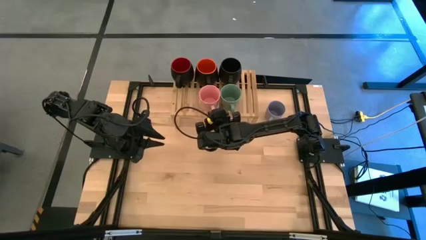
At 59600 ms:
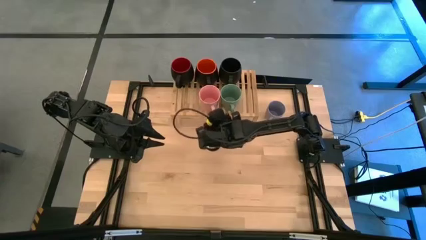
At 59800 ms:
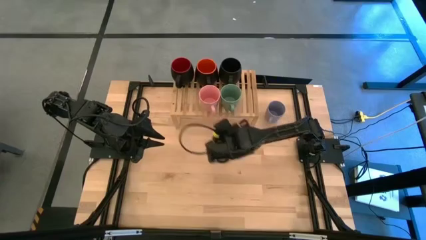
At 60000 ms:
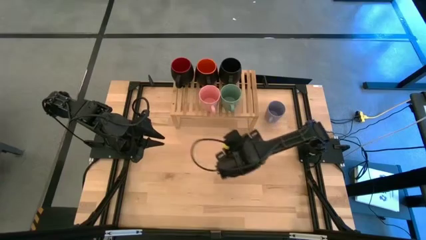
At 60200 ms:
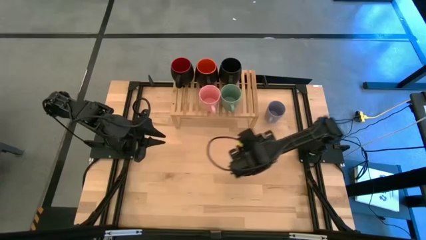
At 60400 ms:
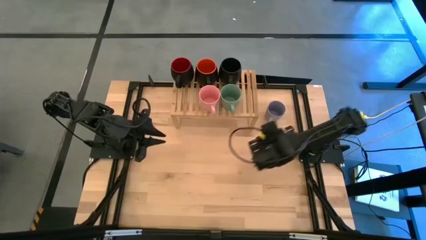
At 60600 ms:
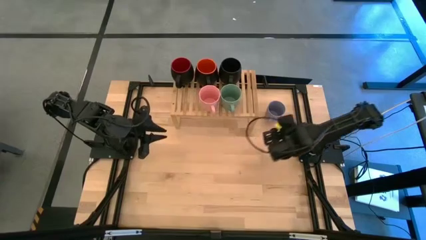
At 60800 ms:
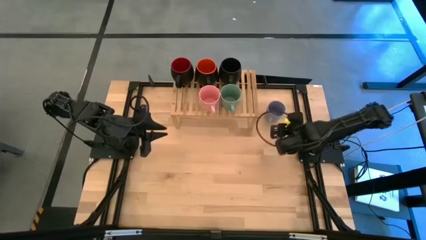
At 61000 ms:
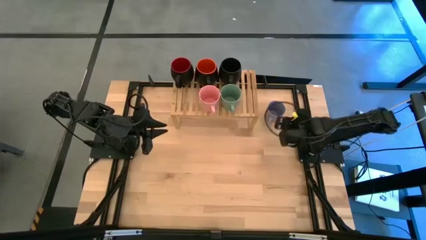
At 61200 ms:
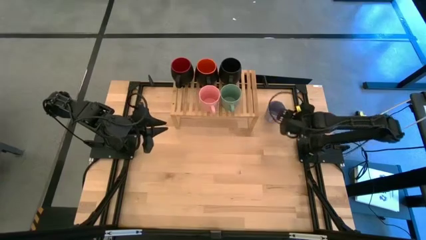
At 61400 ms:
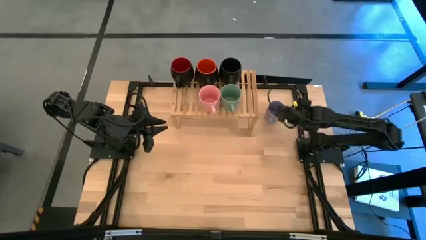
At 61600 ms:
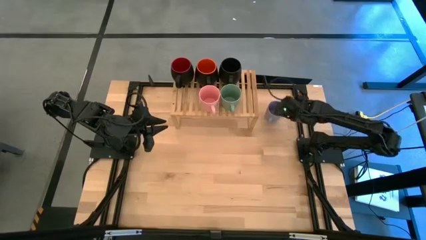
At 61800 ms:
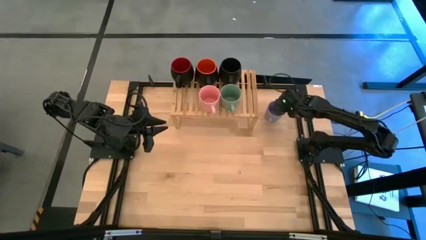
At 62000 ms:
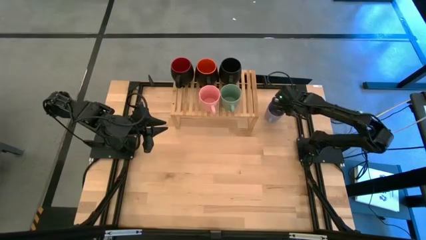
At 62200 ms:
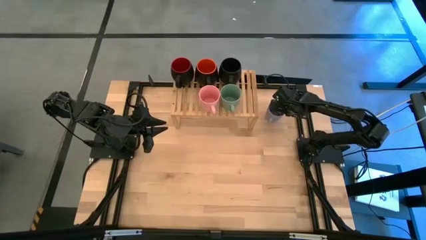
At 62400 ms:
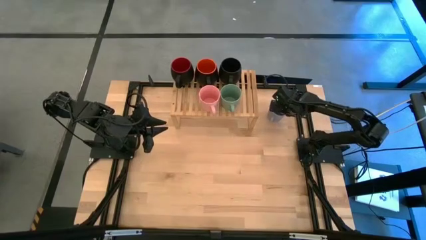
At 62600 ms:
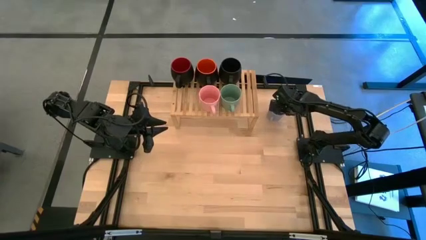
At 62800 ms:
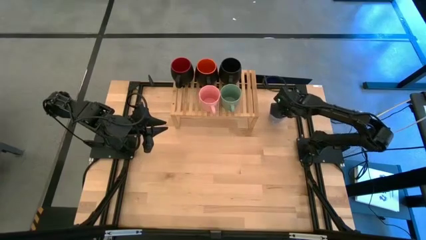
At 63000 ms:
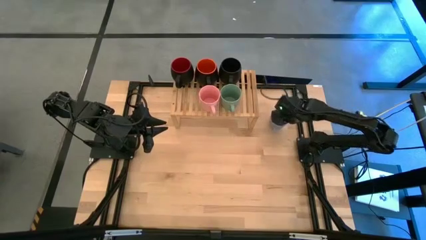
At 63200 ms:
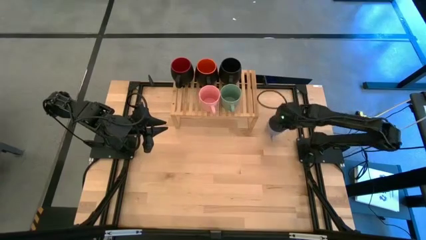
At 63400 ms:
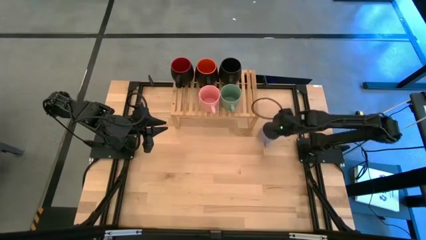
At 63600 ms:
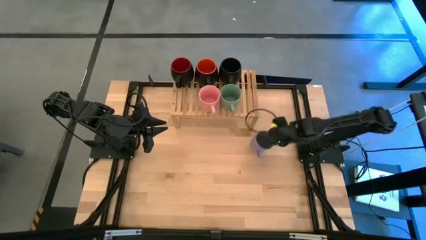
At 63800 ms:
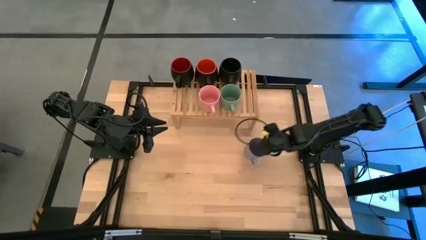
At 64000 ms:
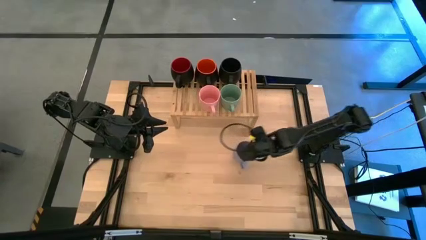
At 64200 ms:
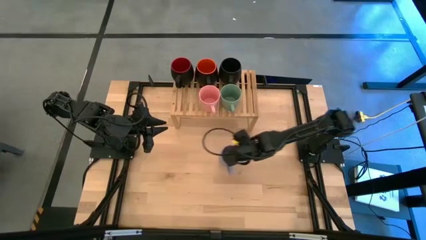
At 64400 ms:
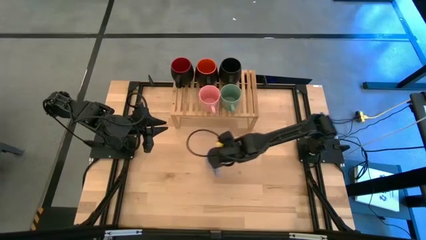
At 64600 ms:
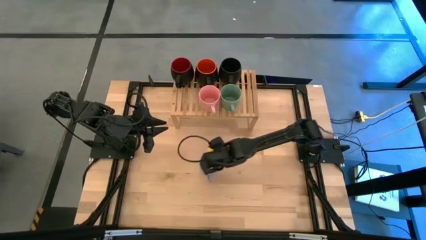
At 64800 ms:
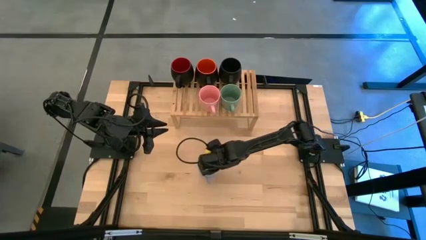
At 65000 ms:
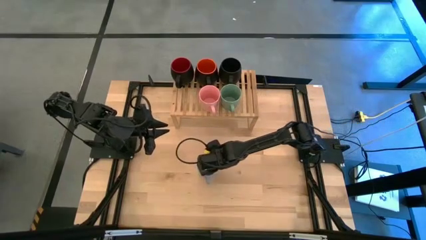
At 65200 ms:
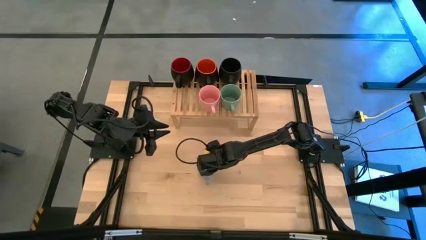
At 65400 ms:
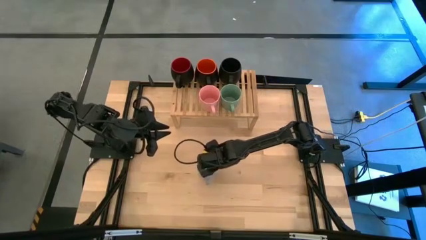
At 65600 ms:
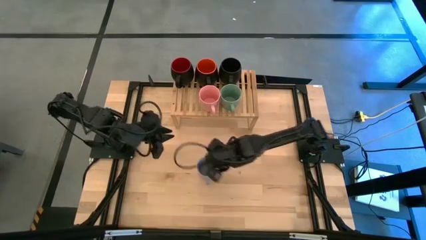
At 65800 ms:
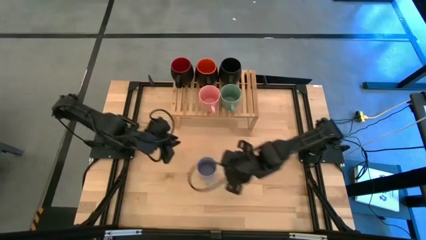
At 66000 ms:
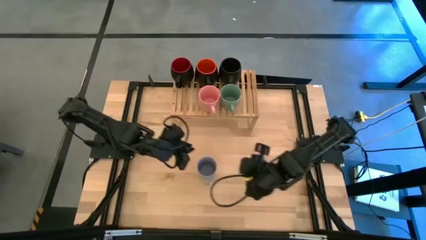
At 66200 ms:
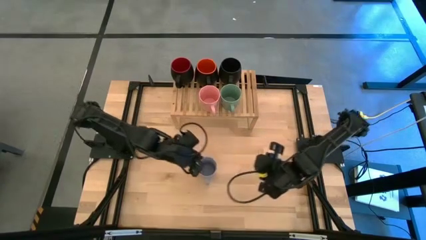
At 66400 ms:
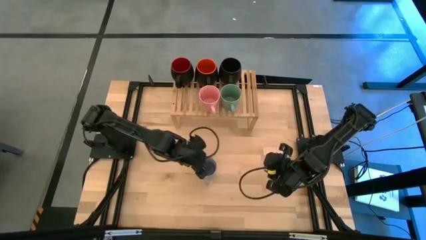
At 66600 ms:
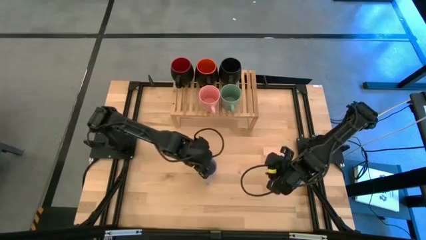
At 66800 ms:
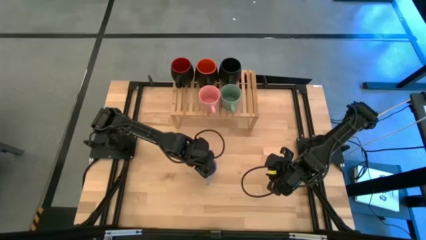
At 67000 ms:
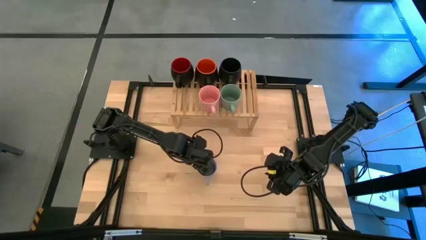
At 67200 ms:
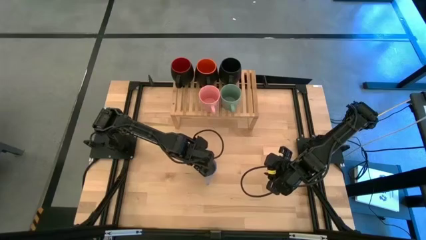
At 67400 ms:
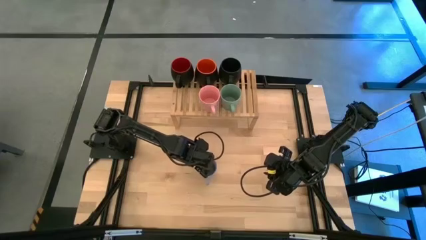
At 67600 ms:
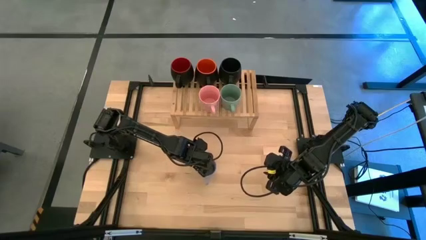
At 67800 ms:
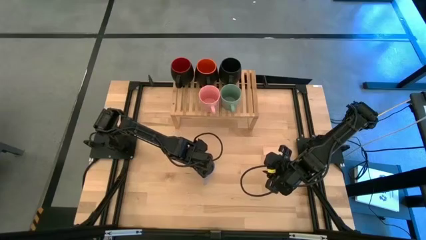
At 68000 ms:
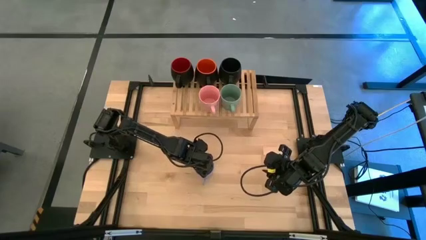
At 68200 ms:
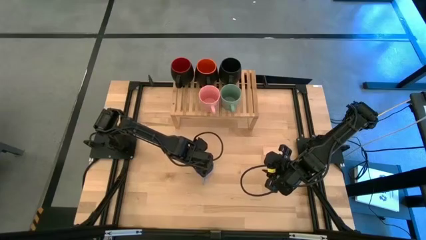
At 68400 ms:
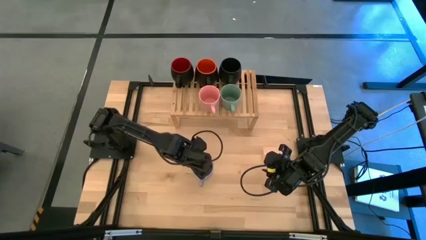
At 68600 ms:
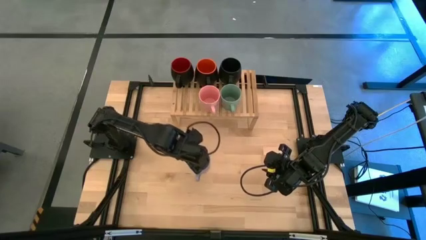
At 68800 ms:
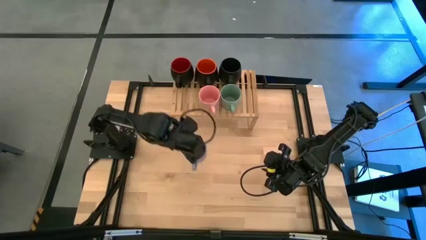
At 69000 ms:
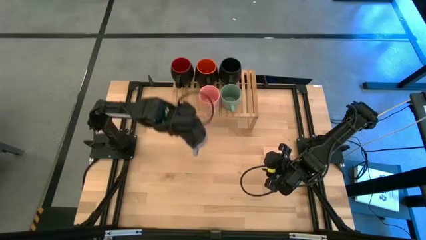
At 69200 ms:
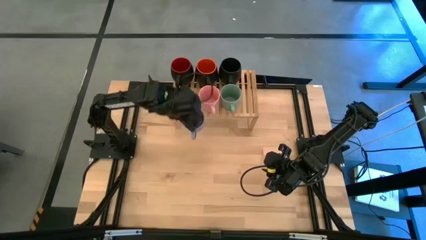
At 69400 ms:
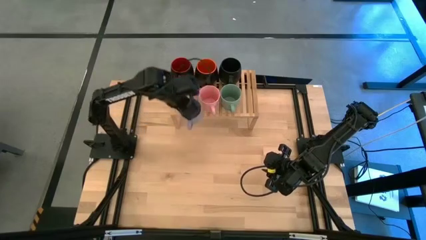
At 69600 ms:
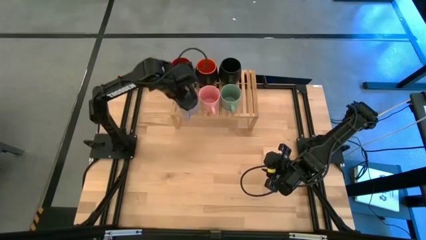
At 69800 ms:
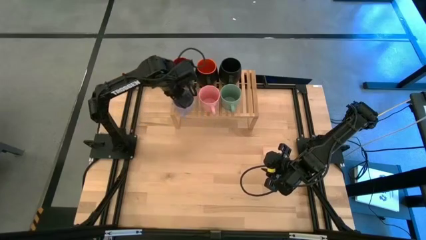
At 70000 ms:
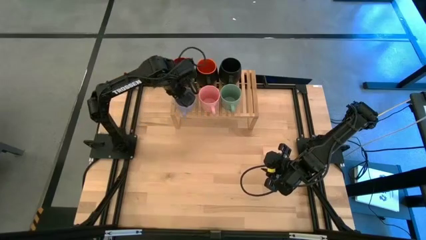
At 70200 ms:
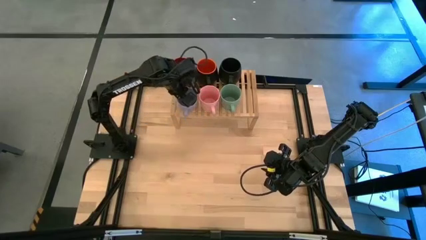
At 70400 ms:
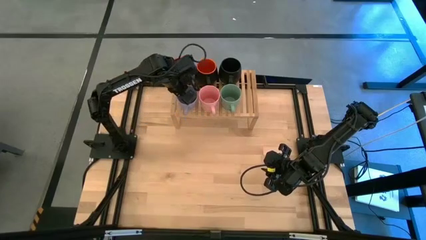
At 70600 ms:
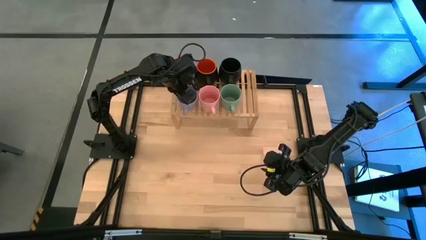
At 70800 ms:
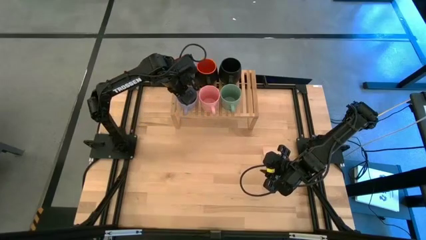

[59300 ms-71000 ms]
Task: Place coffee mugs
Put the blue mug on the shelf

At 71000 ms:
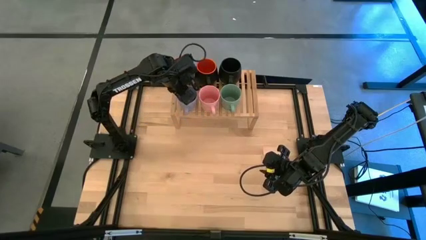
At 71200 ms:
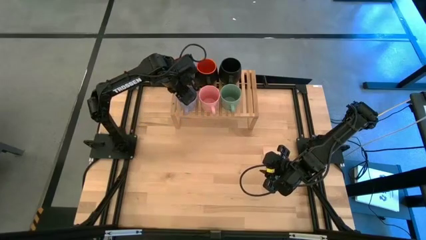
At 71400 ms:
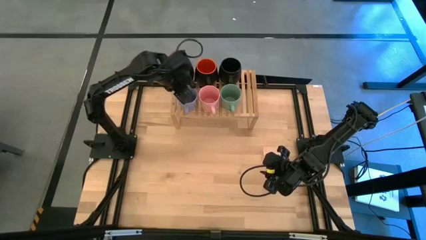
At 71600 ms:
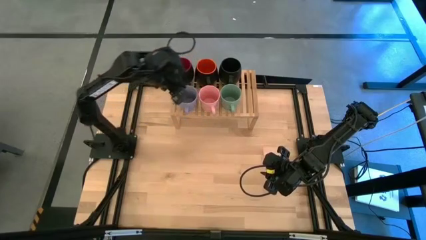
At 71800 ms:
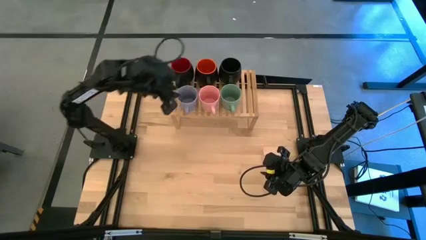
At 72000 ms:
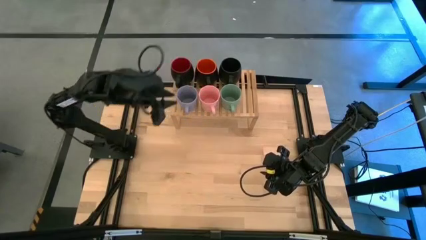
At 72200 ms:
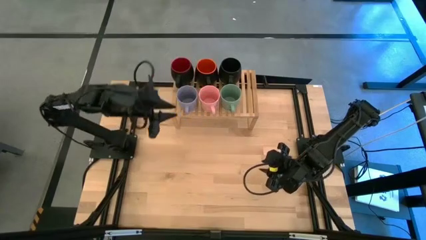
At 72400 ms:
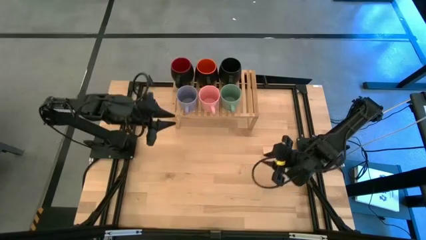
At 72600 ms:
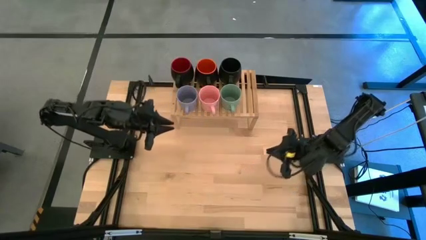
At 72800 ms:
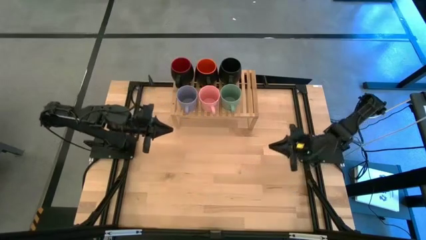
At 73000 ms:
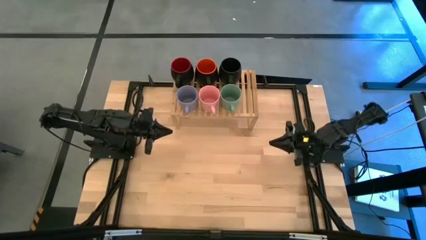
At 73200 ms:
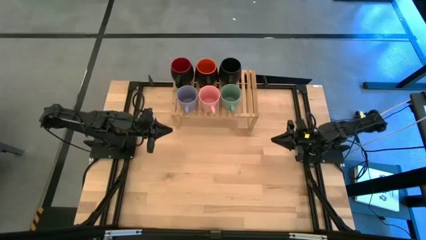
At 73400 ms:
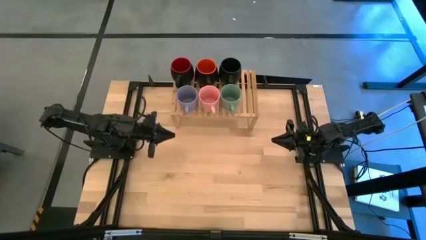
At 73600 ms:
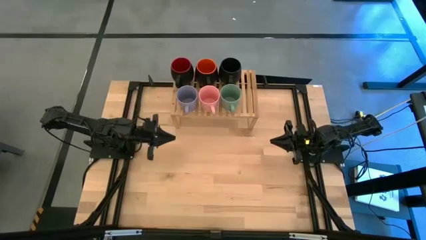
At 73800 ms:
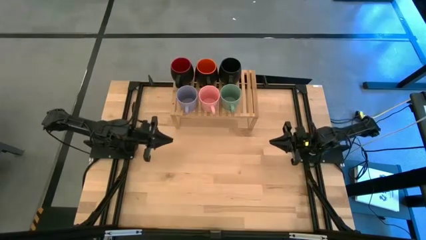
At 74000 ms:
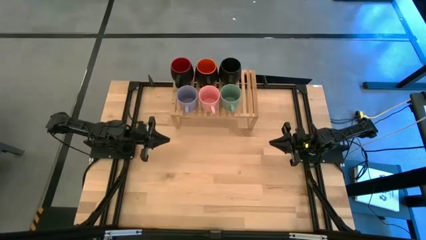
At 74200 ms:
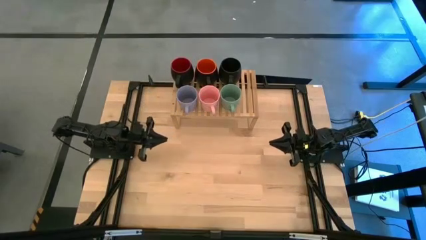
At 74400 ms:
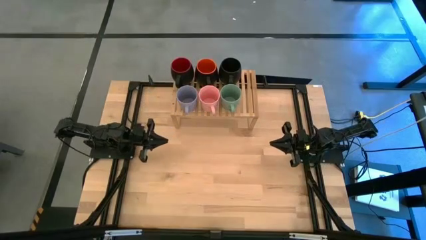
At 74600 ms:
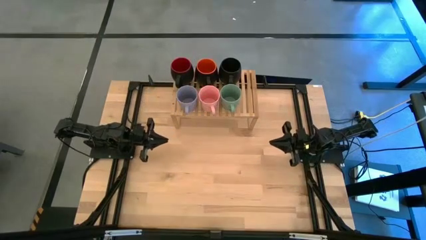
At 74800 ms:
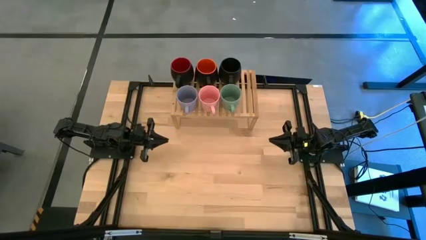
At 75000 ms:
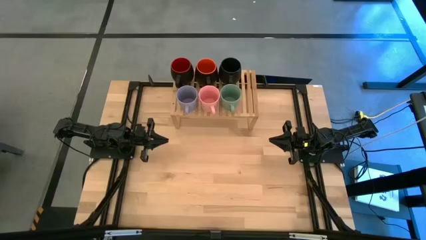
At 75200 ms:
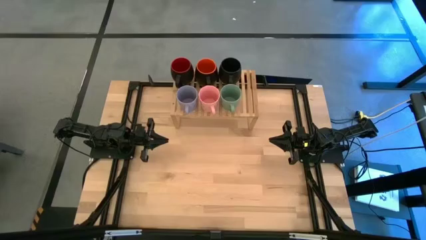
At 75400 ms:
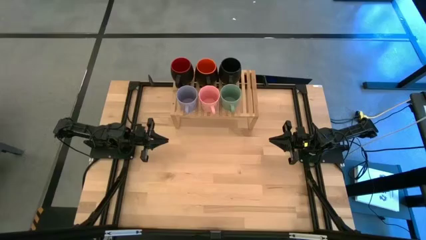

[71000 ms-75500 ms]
Return to Home Position
